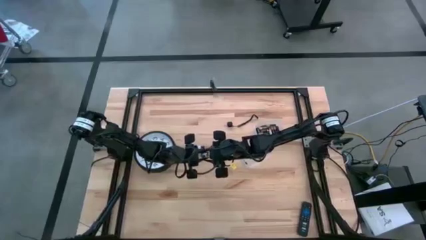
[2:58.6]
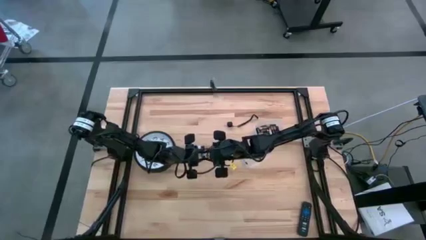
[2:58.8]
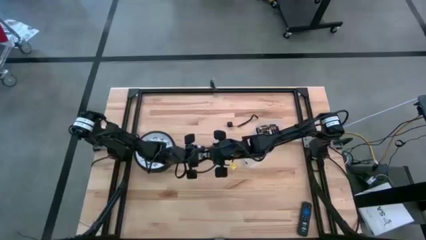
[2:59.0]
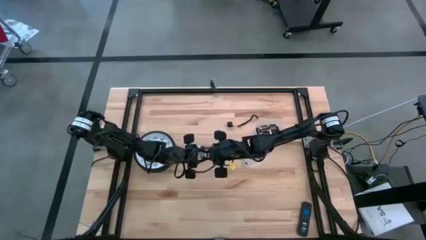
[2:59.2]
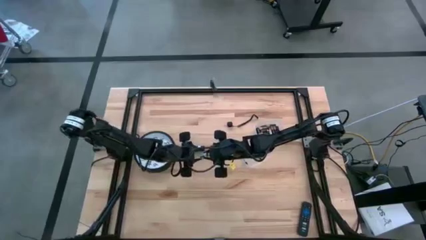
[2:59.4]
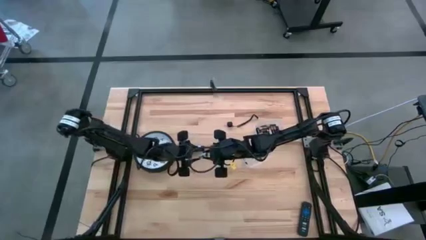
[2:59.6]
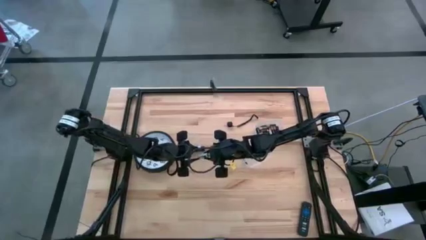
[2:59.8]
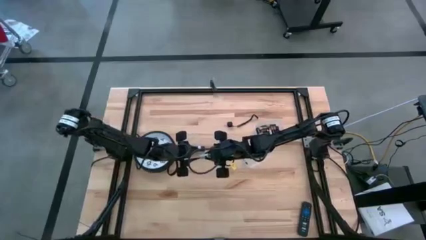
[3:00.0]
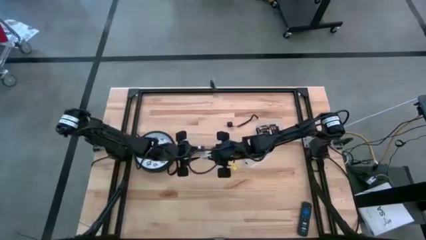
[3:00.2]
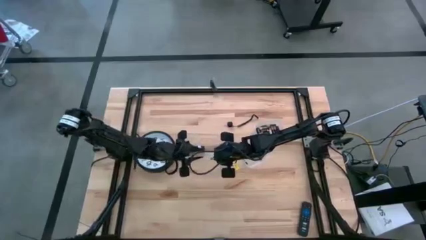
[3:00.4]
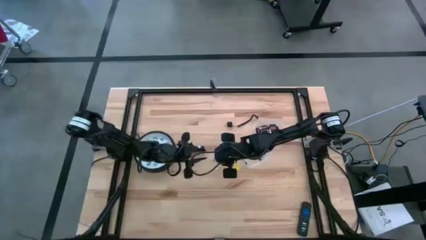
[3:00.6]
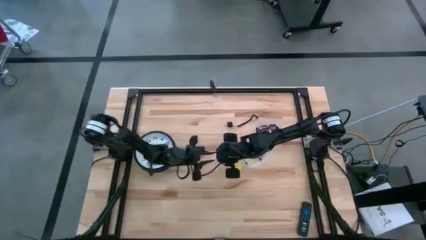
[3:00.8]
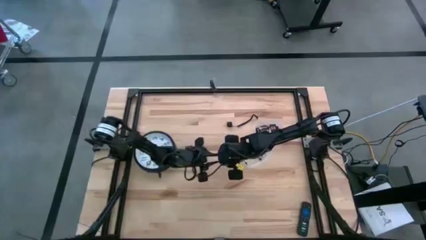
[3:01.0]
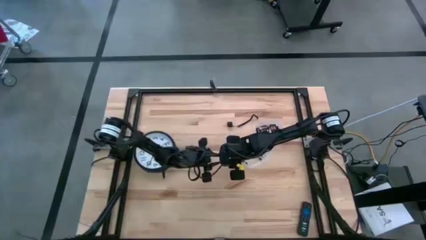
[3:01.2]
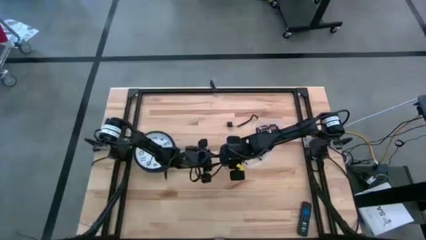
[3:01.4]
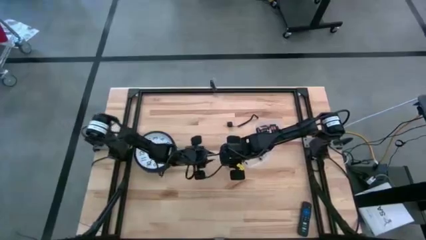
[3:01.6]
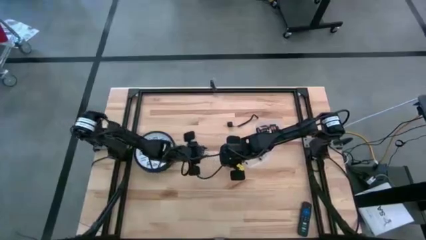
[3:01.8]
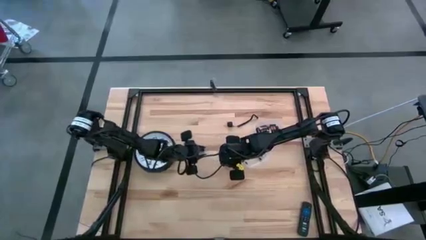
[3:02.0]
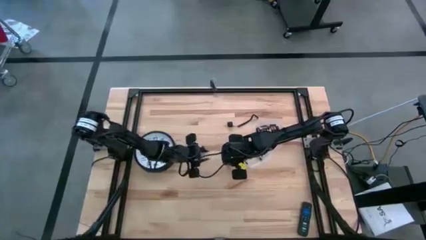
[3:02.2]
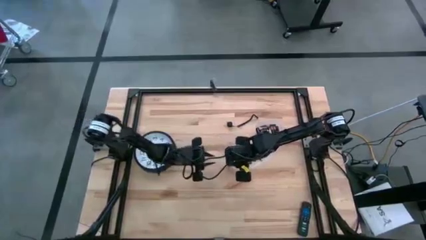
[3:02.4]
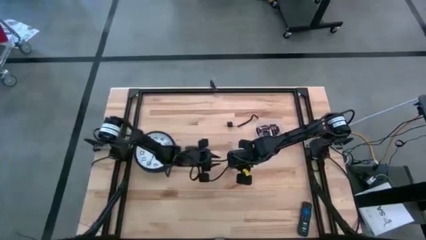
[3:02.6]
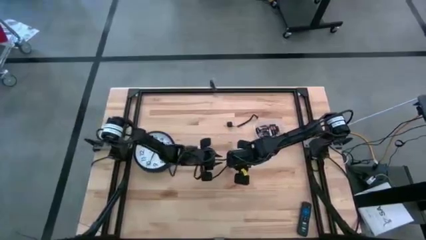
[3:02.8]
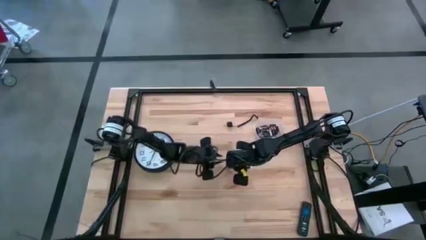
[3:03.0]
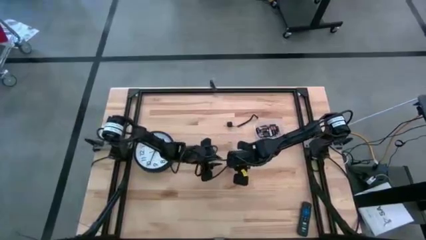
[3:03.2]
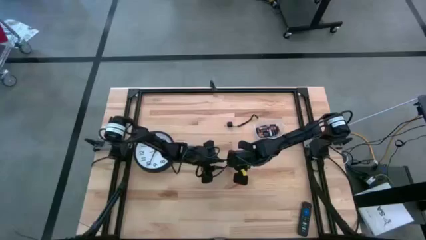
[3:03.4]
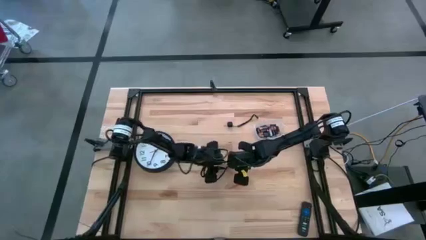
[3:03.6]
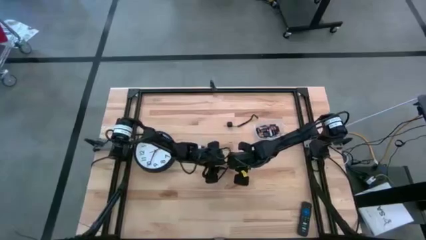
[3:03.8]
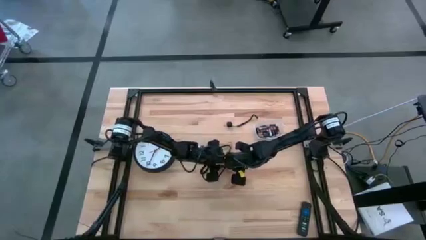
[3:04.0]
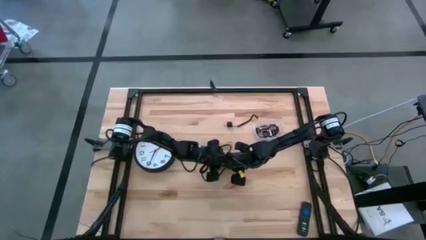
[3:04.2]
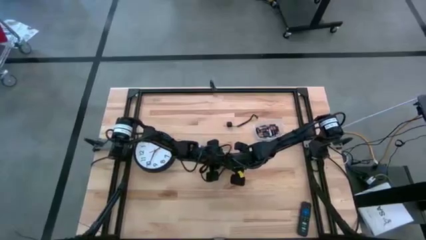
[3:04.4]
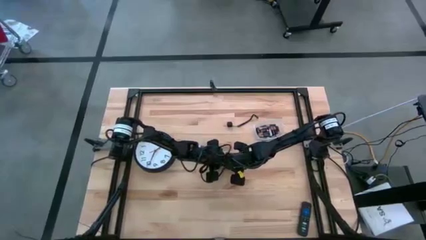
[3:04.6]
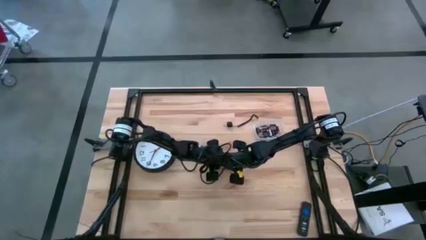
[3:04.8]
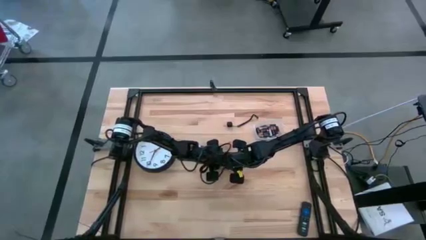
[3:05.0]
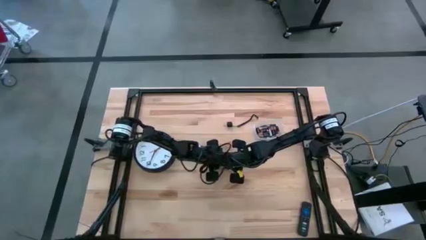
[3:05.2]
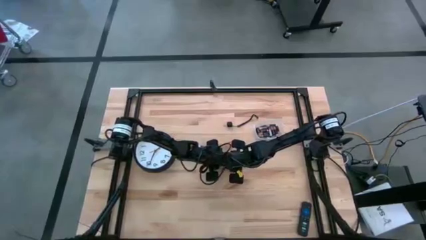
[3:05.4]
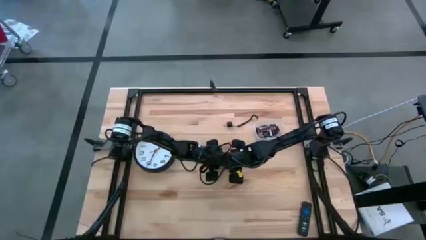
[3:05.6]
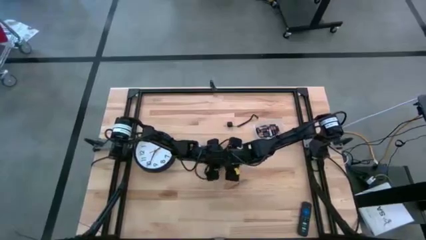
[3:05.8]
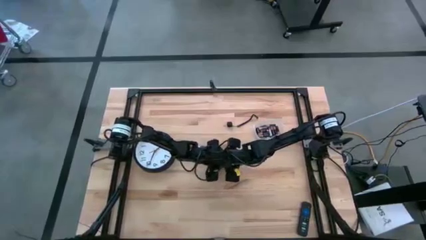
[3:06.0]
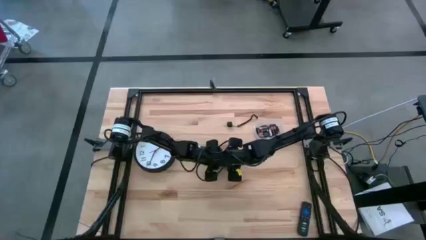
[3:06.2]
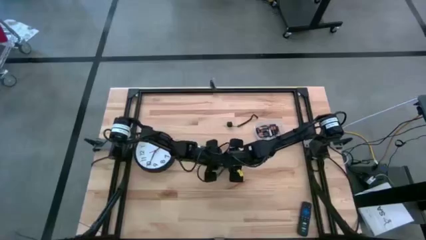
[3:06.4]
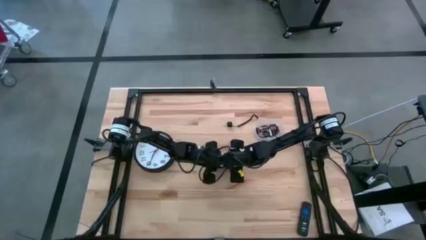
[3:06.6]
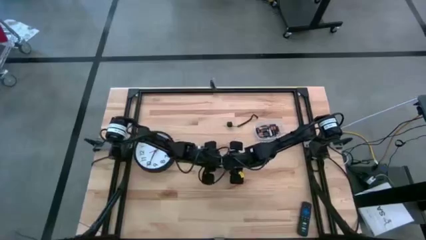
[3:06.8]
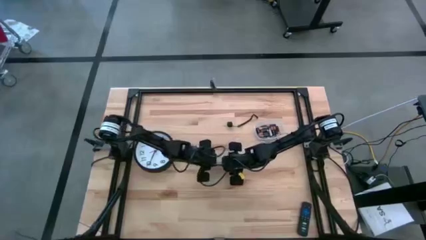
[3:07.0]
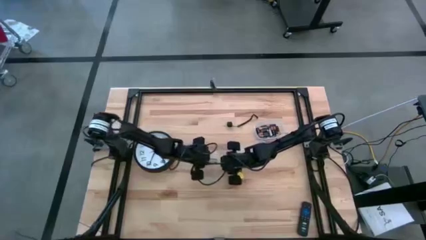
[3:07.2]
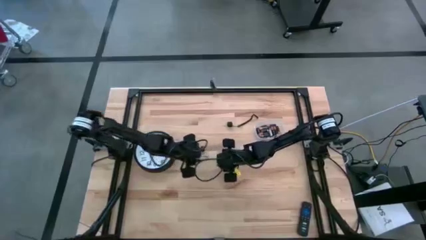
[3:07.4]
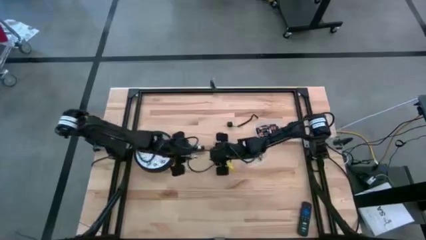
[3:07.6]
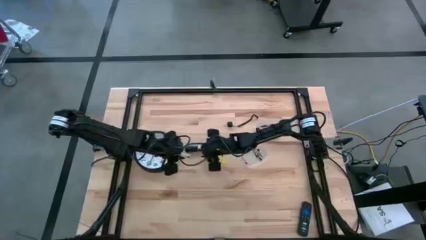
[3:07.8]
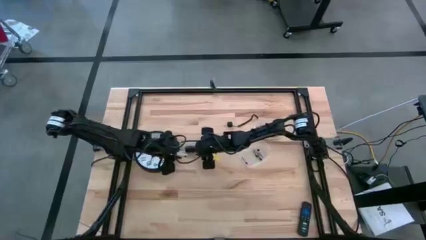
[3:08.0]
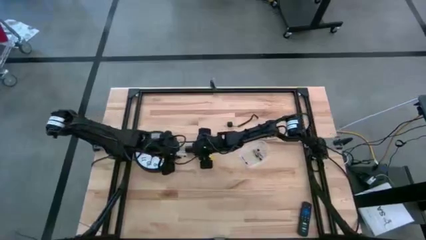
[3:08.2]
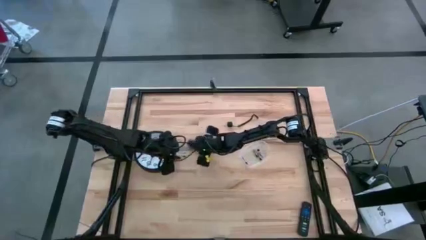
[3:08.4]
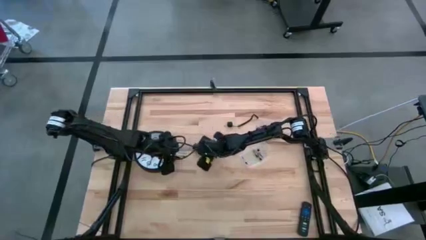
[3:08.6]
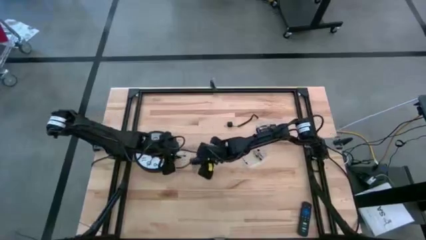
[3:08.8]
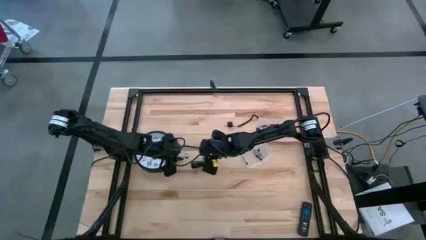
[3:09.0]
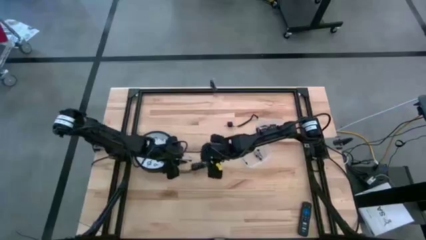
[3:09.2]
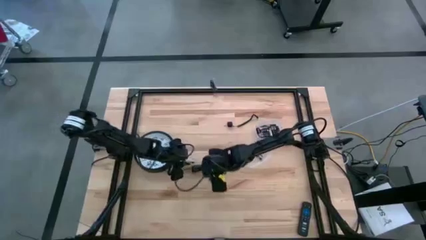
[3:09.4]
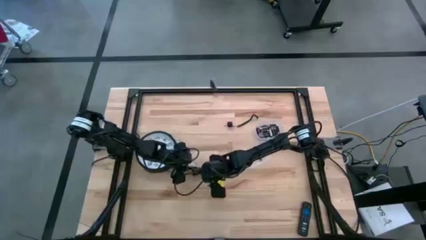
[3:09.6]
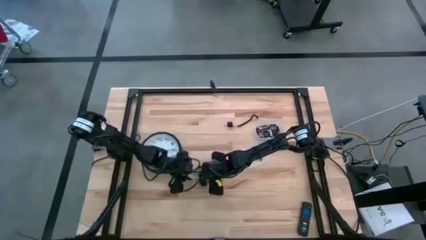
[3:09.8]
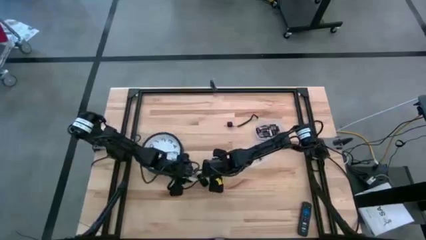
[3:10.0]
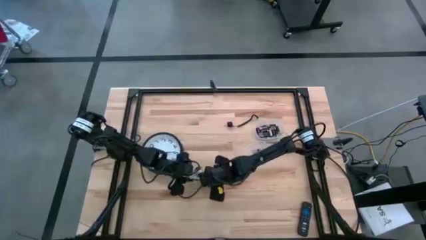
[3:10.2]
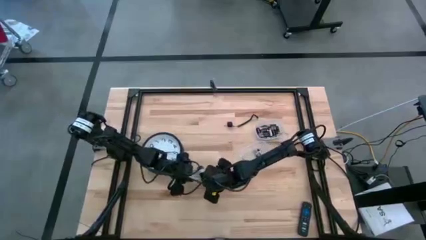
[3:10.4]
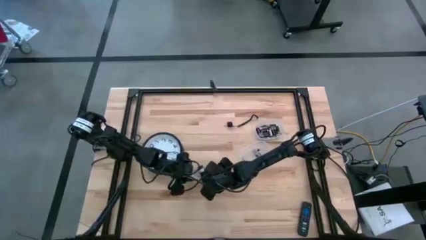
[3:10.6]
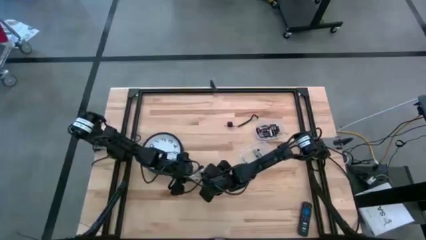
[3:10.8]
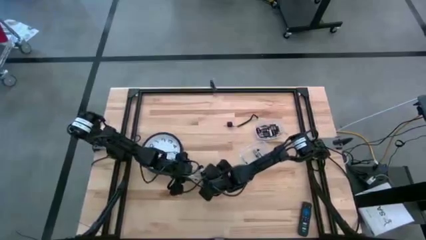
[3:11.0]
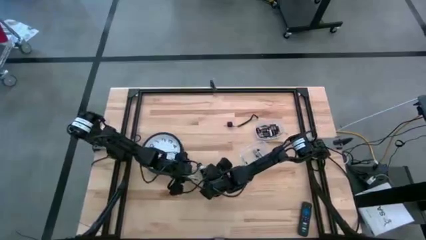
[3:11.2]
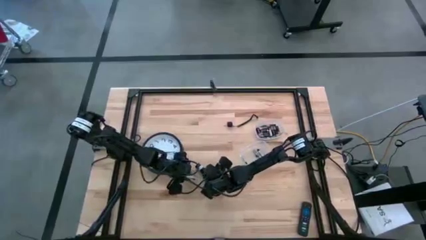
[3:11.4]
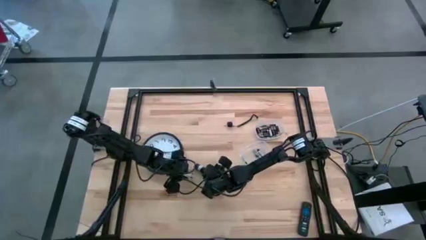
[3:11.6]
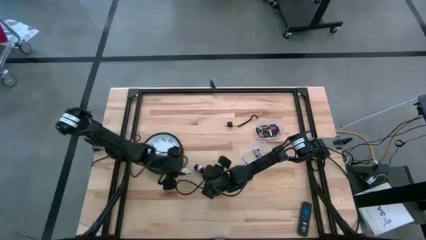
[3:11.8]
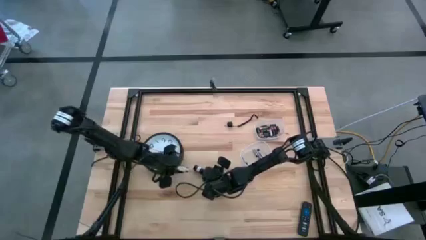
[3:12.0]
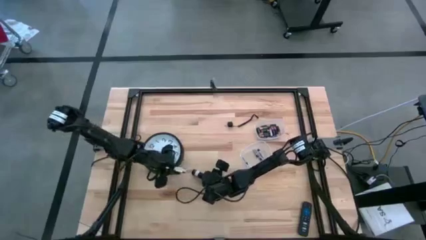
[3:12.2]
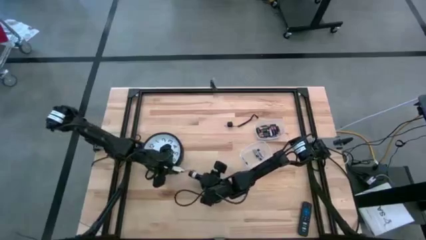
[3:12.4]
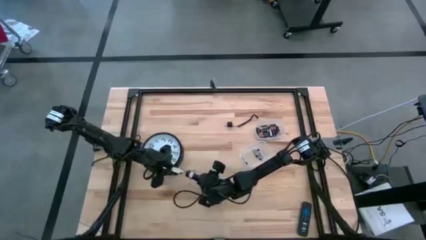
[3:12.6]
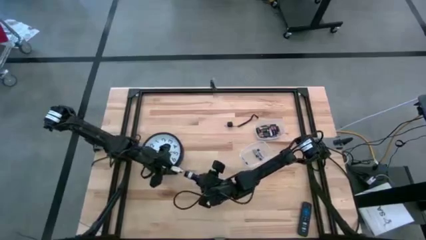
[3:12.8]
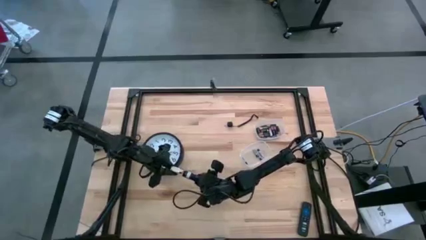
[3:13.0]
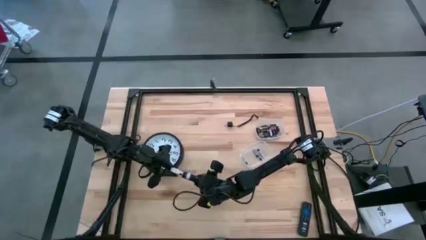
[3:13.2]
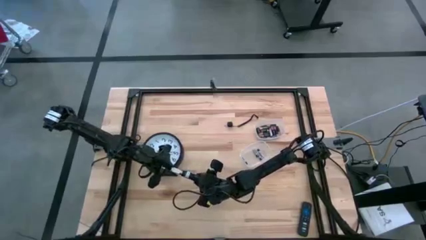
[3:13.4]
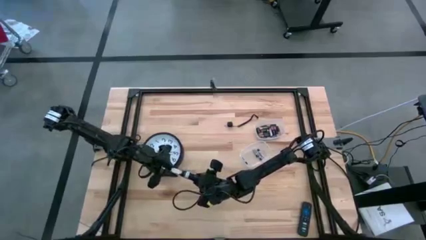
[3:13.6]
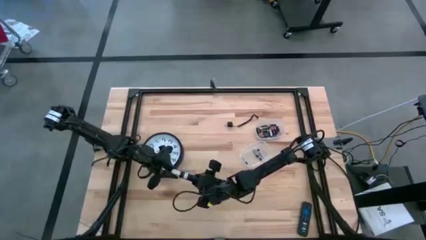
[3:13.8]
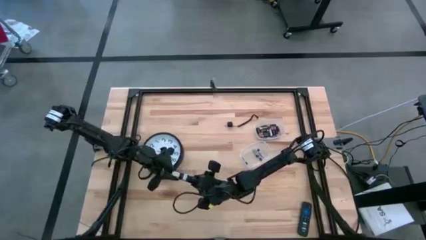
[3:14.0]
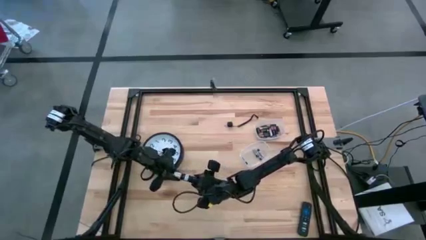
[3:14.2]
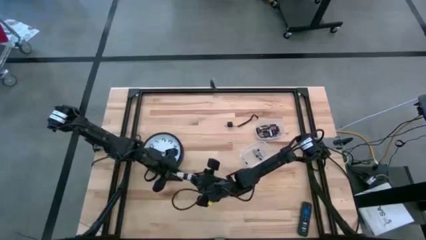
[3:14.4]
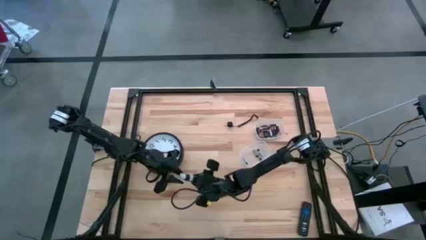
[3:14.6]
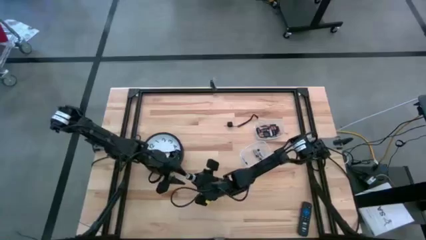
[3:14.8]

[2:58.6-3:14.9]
Task: Insert battery
Insert the white battery holder into the white flashlight compartment
